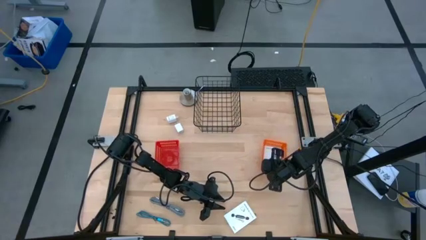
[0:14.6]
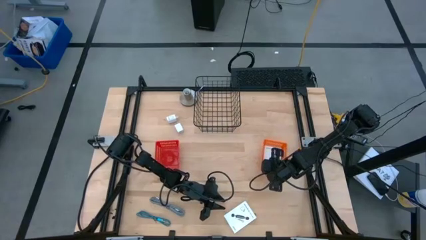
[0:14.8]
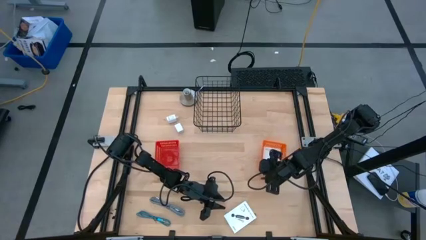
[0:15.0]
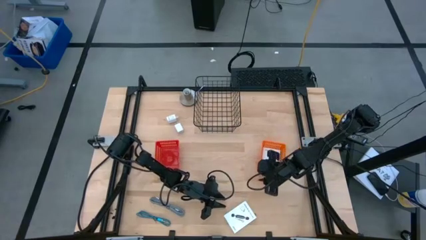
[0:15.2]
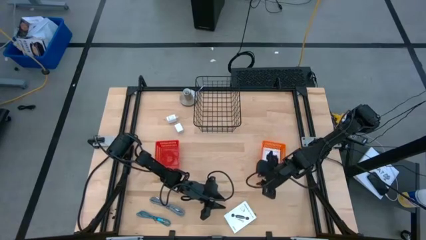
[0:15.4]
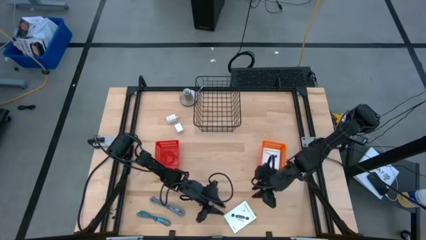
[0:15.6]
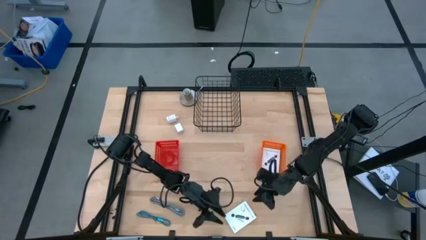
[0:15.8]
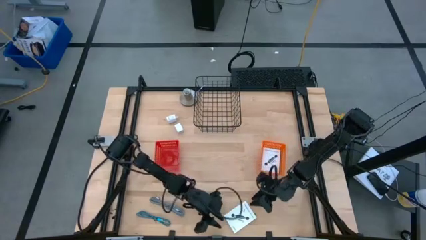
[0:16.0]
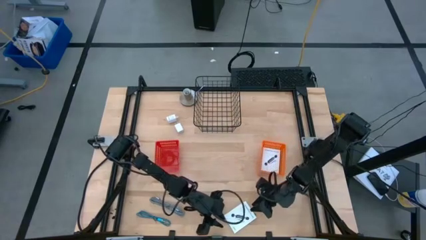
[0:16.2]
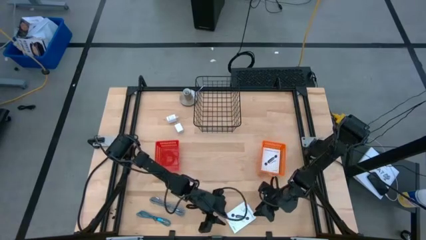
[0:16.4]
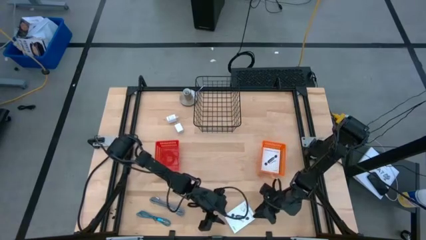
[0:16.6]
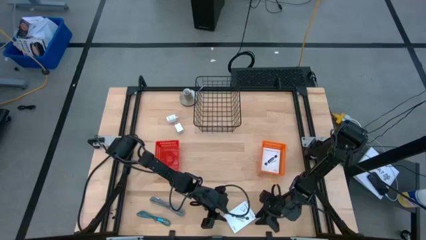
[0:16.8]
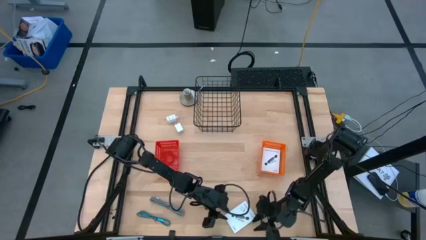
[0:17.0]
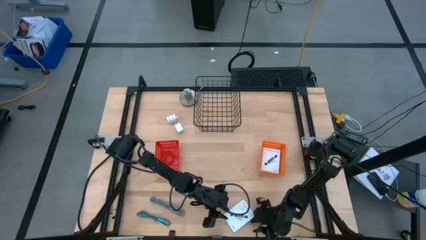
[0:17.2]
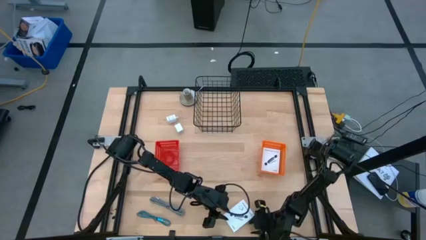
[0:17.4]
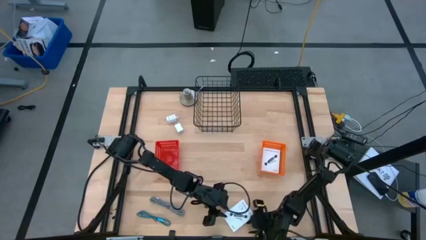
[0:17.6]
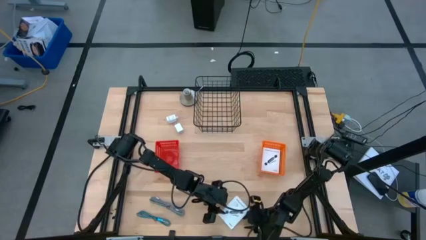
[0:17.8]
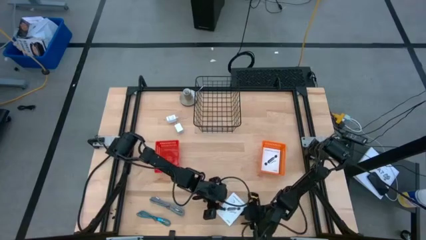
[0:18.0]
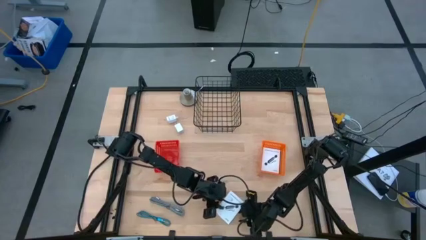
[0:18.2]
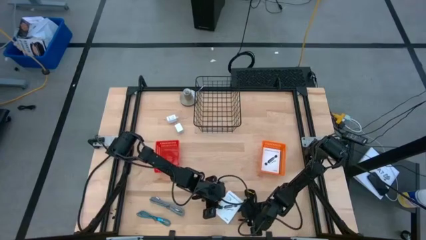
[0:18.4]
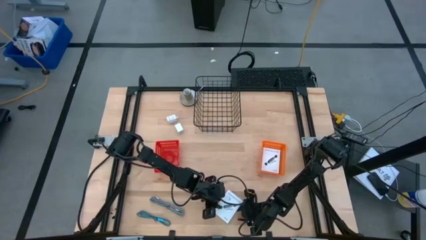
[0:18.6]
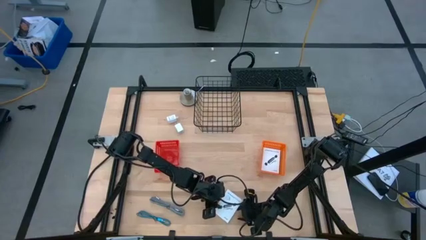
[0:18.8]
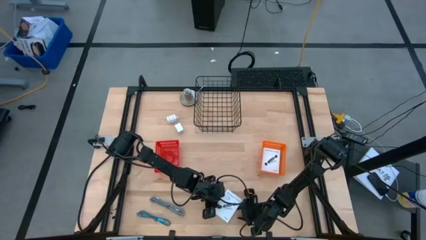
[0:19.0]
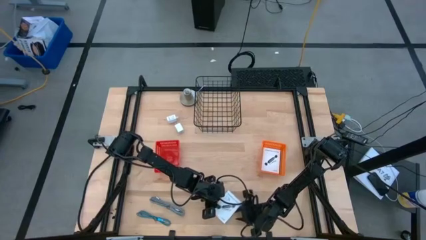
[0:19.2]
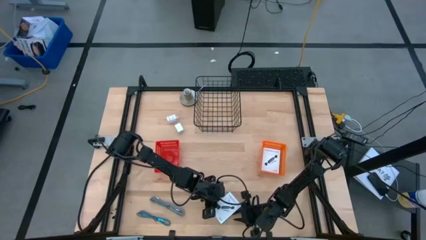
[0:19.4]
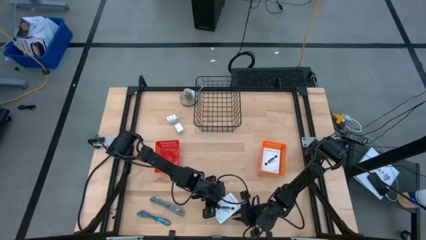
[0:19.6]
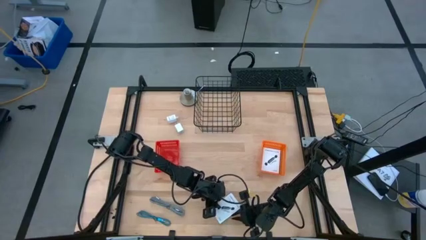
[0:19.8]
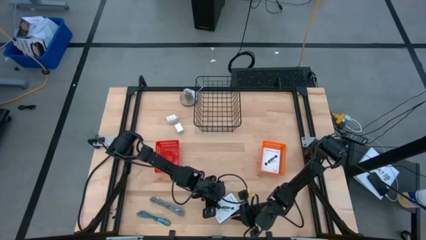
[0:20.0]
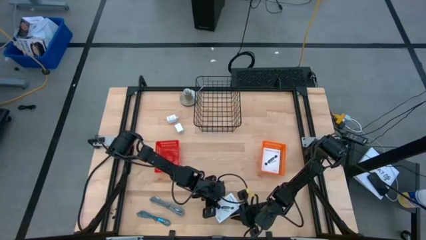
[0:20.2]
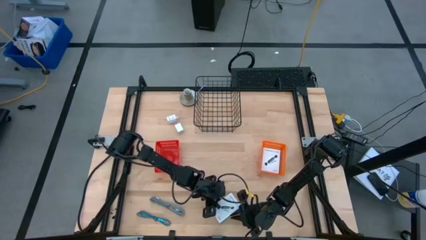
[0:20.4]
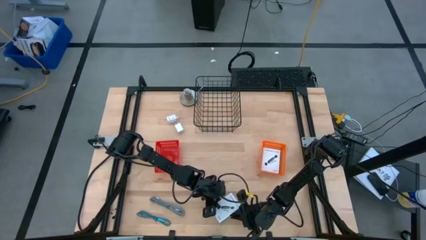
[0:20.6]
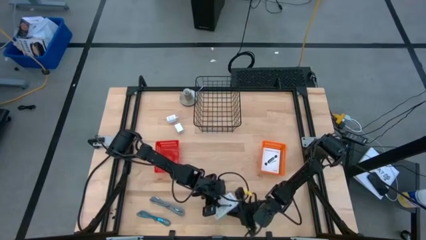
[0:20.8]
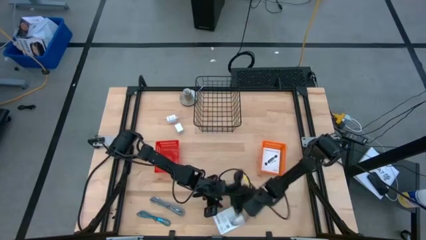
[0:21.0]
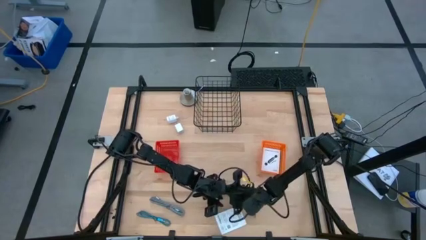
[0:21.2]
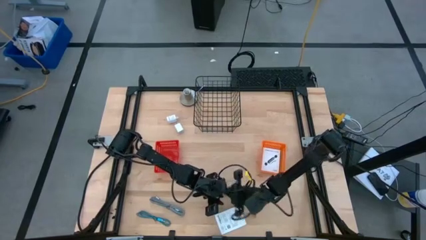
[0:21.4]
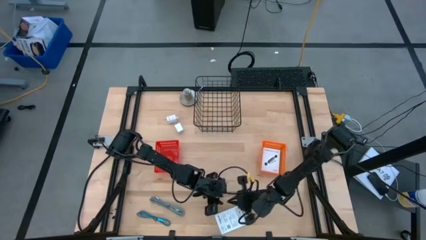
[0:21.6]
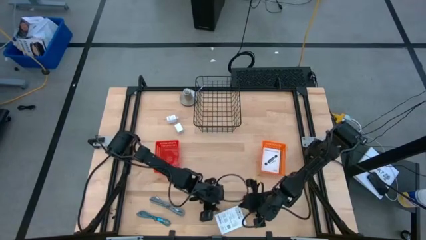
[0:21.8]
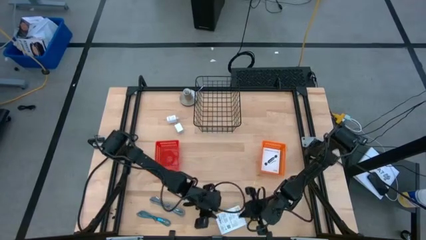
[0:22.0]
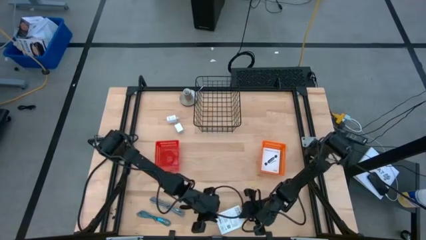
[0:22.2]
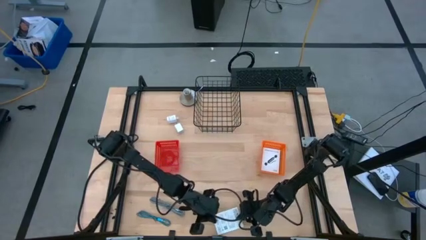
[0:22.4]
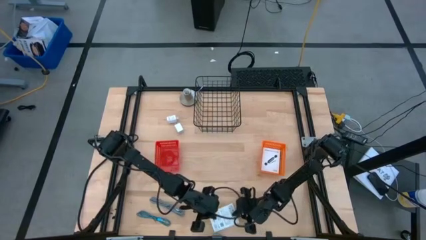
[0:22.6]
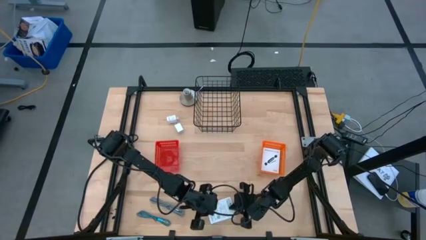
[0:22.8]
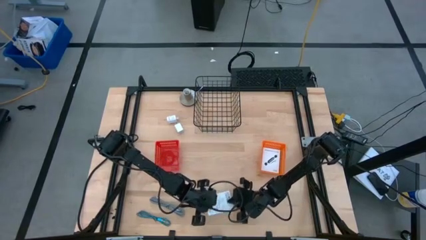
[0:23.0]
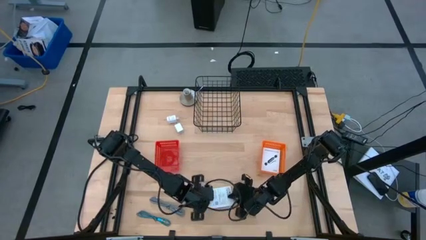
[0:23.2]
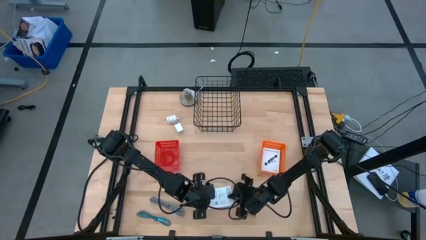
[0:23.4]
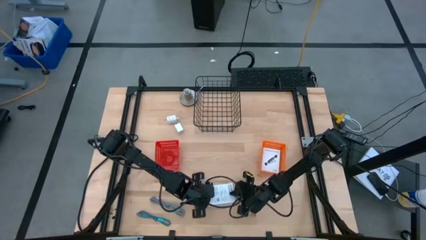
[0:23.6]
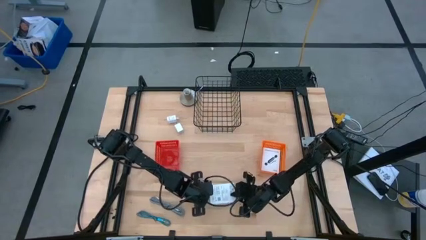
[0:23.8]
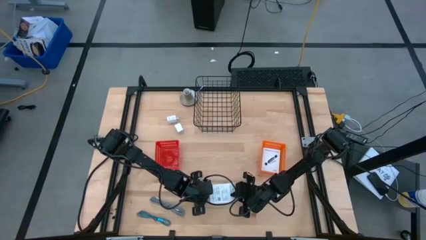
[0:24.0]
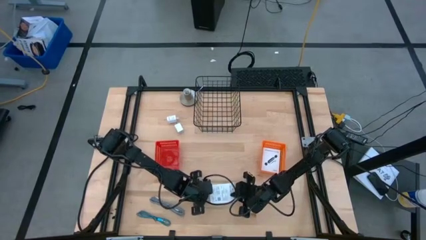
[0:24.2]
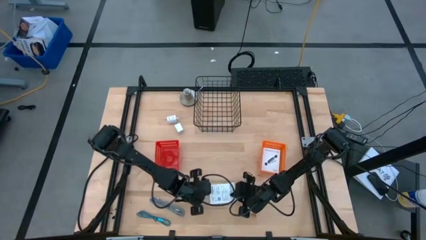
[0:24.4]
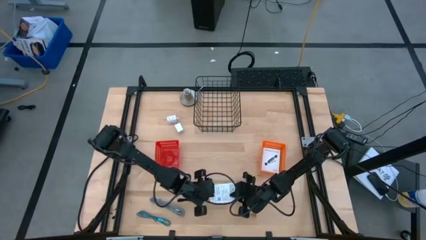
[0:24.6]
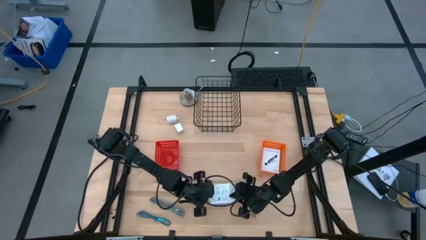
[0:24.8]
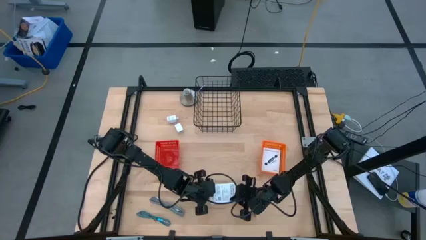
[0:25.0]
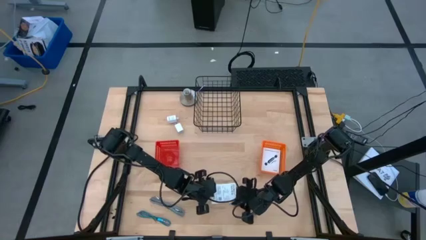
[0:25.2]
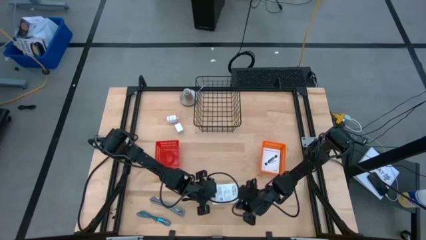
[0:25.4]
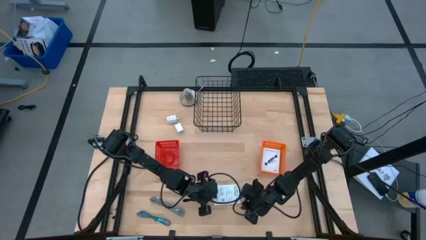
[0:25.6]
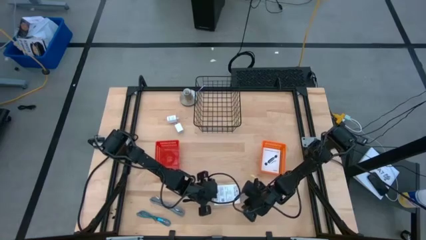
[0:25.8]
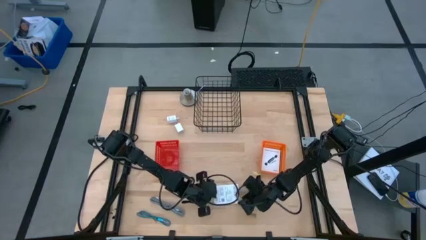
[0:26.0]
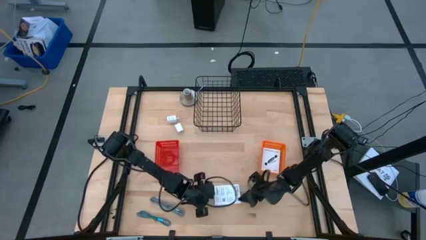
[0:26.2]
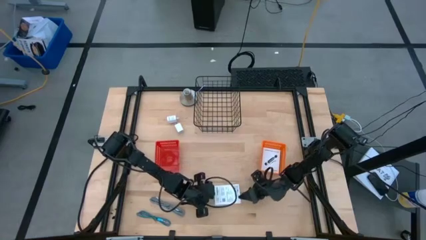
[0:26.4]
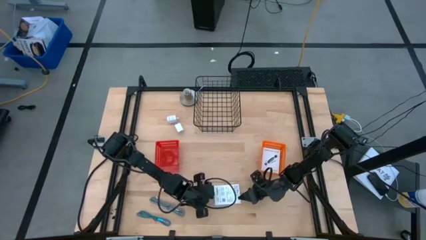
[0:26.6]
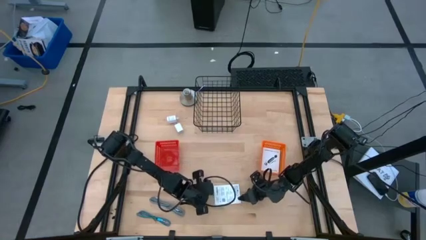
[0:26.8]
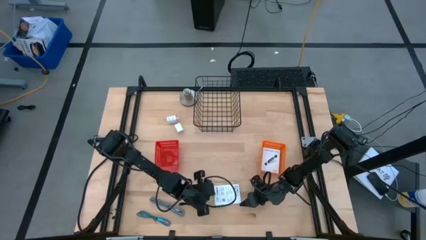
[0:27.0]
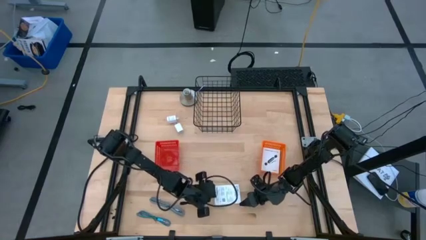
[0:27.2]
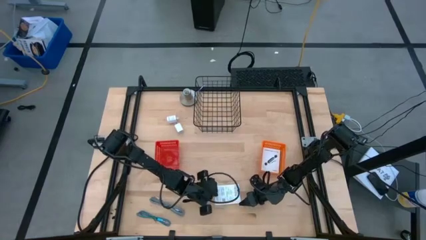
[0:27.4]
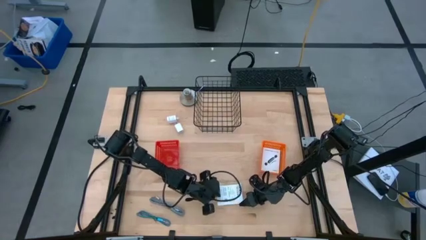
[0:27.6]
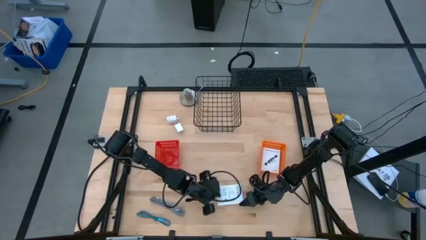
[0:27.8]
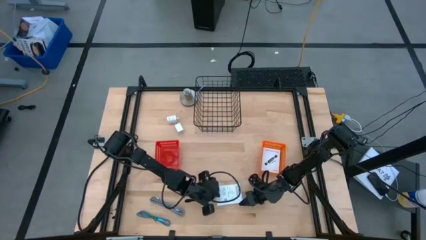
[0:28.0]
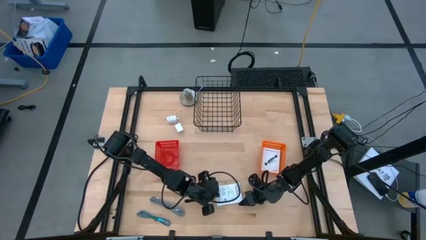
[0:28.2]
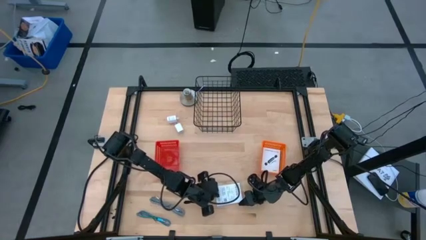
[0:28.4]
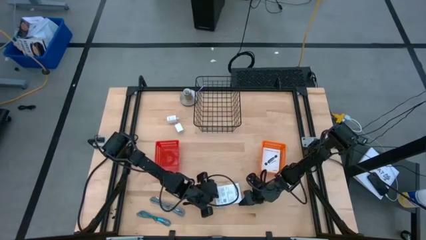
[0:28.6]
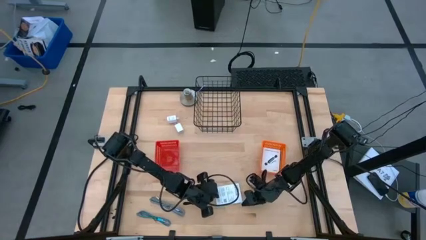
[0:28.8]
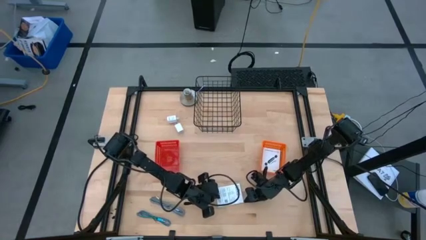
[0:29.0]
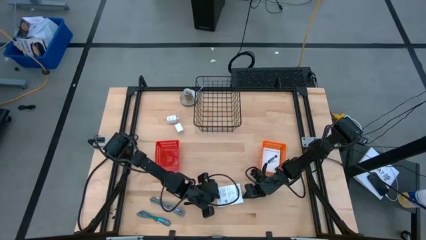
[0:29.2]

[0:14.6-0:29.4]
Task: Pick and place items into bin
Put the card reader box into the orange bin

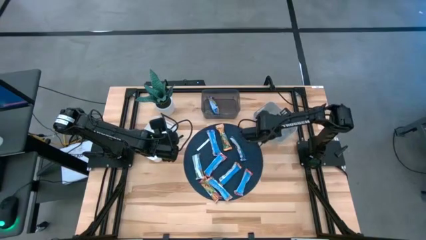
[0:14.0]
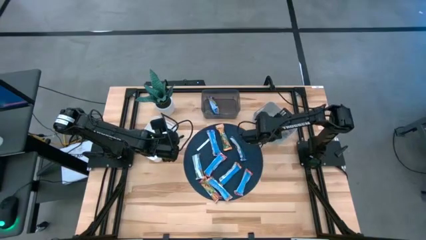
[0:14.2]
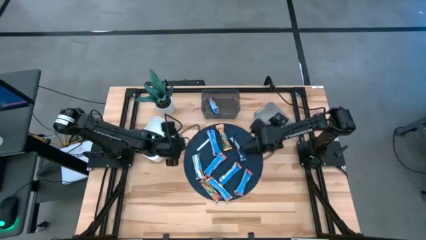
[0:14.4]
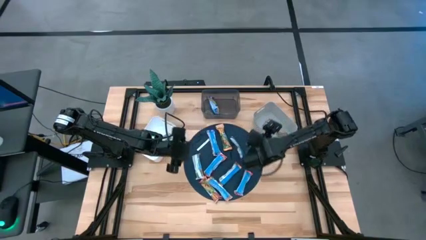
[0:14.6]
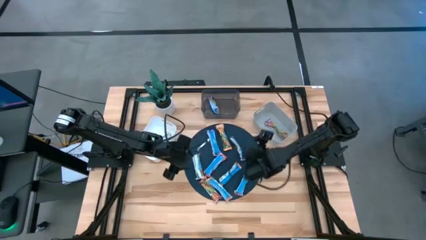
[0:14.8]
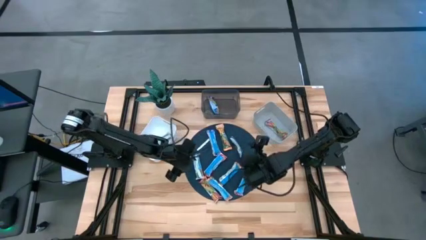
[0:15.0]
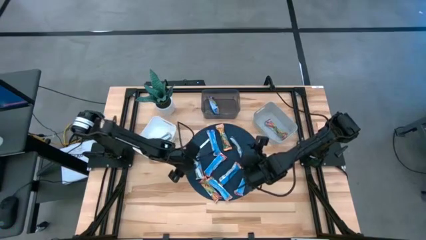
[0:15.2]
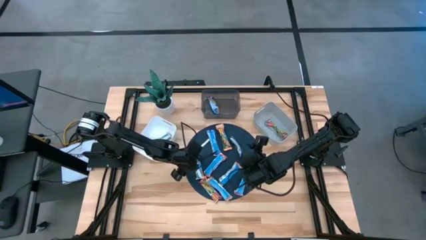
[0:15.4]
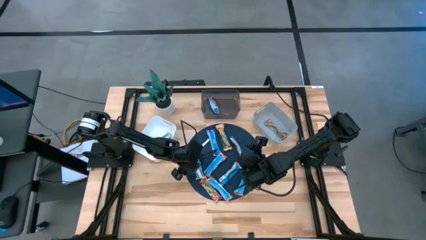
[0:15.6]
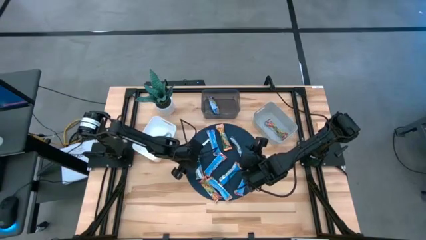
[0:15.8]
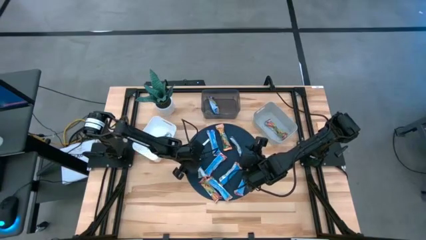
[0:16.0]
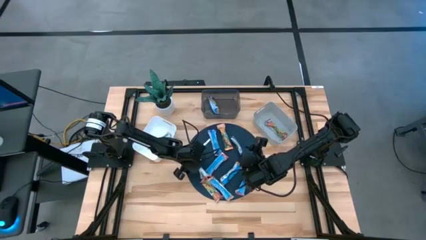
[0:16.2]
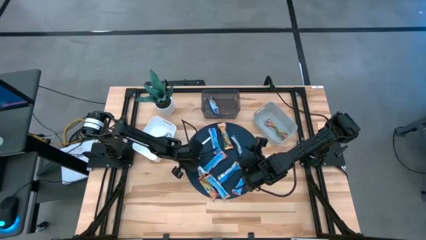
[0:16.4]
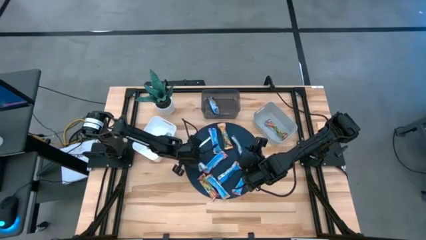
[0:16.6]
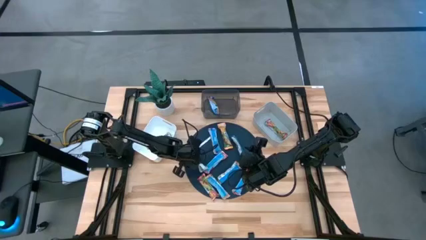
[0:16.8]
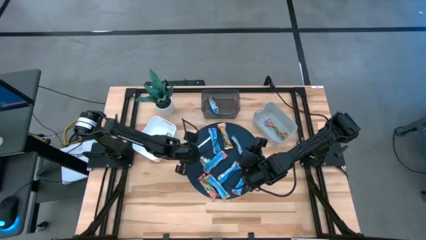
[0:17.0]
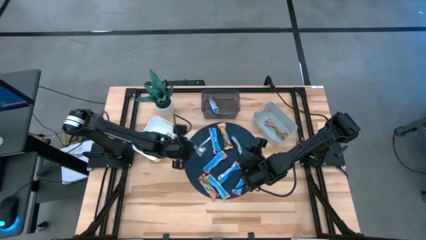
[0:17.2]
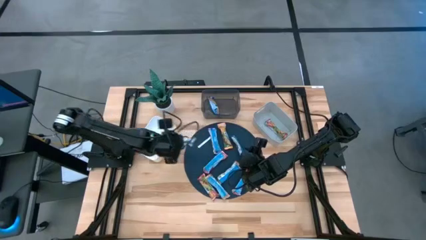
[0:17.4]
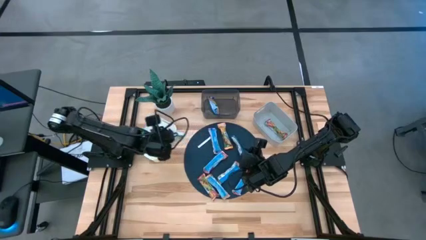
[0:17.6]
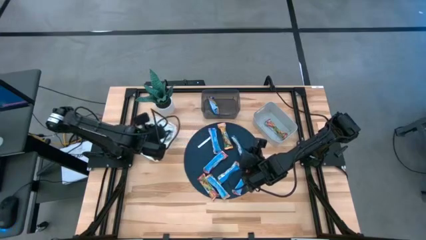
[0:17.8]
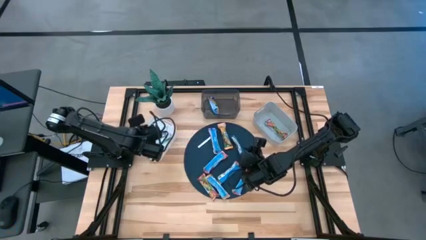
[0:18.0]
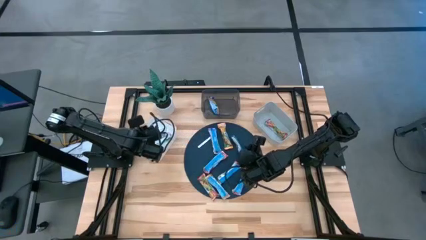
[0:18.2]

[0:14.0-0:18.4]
Task: Pick and place Granola Bars by type
Put the yellow granola bar into the white bin
